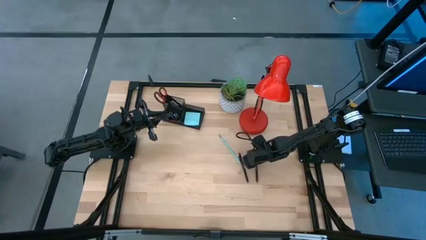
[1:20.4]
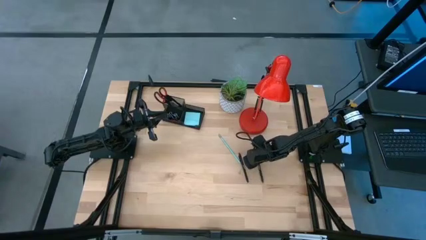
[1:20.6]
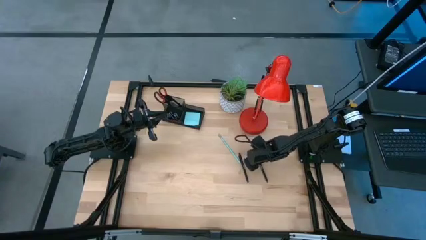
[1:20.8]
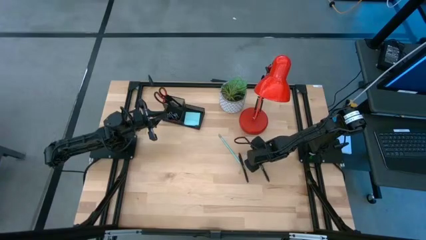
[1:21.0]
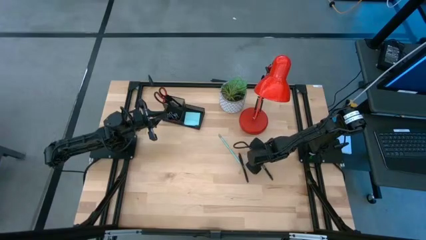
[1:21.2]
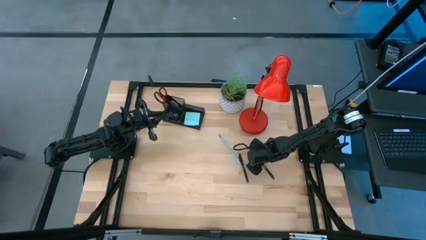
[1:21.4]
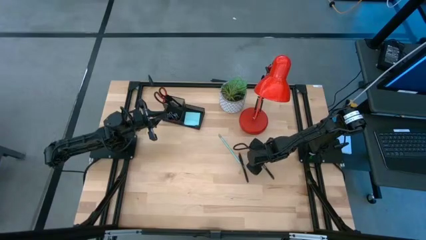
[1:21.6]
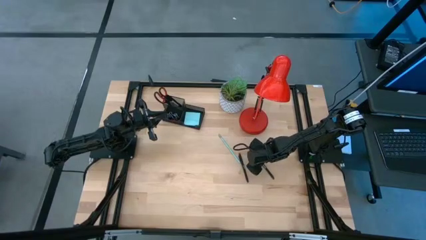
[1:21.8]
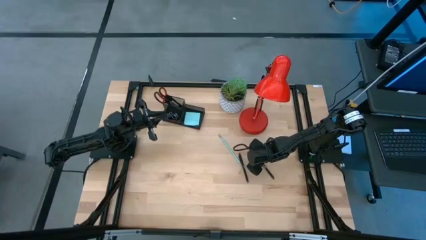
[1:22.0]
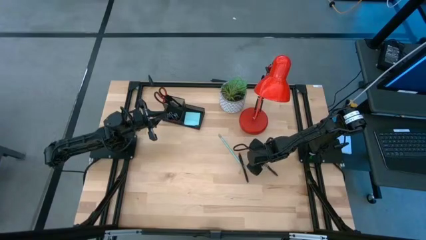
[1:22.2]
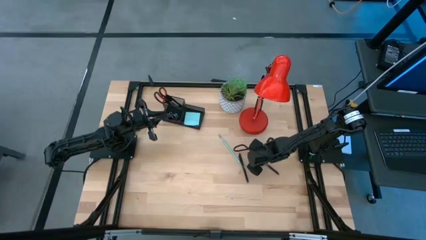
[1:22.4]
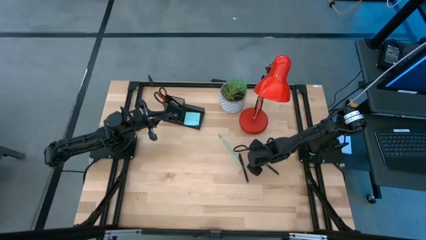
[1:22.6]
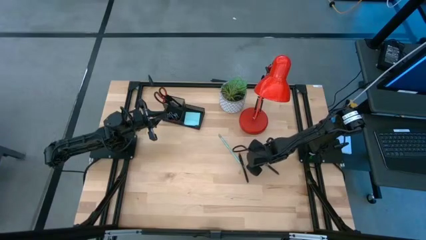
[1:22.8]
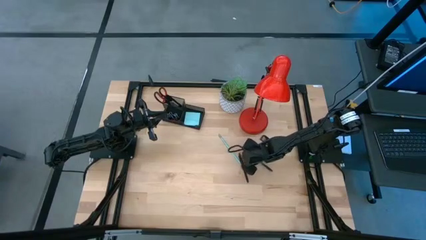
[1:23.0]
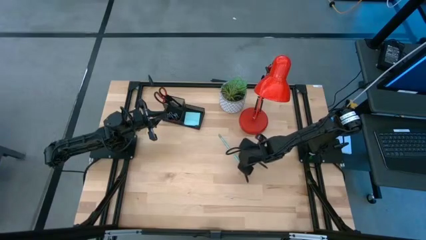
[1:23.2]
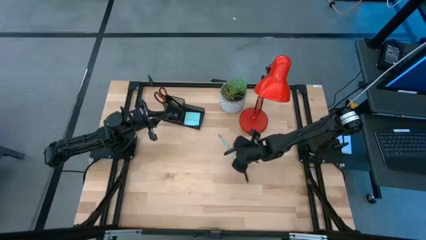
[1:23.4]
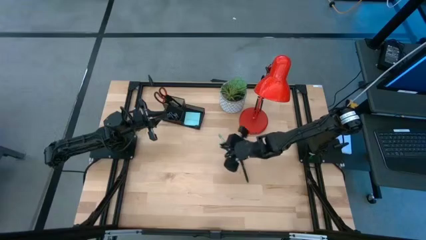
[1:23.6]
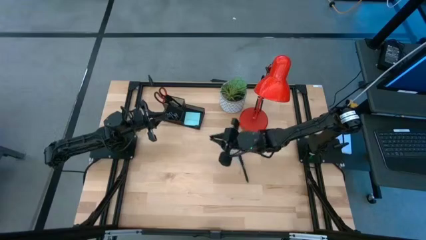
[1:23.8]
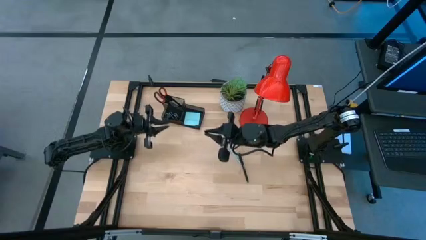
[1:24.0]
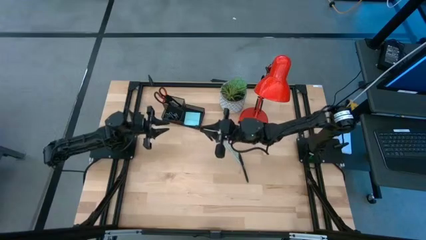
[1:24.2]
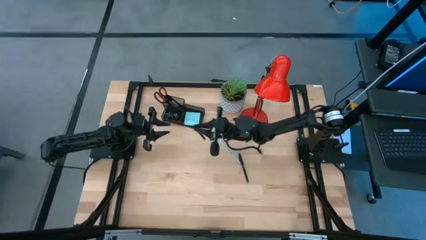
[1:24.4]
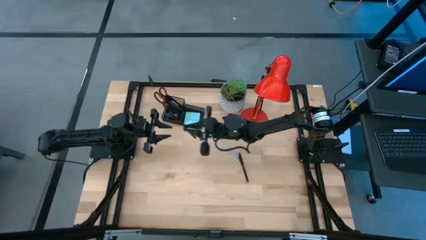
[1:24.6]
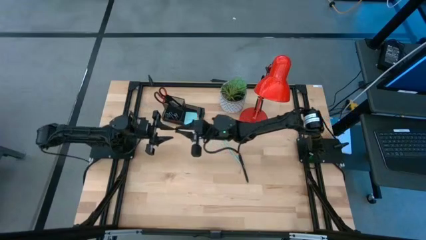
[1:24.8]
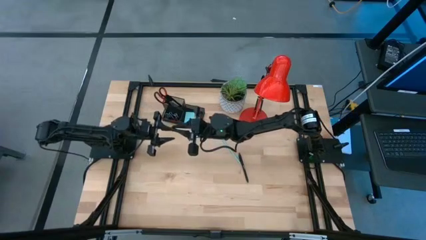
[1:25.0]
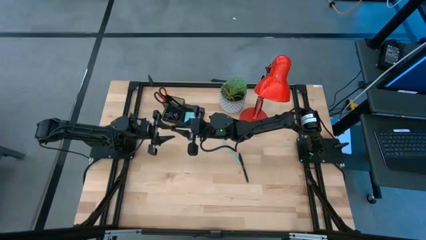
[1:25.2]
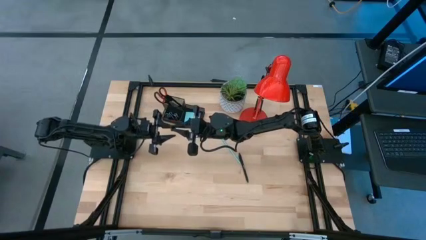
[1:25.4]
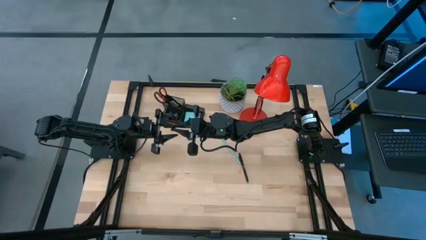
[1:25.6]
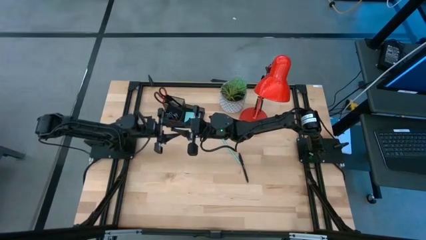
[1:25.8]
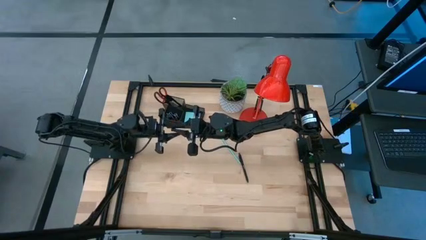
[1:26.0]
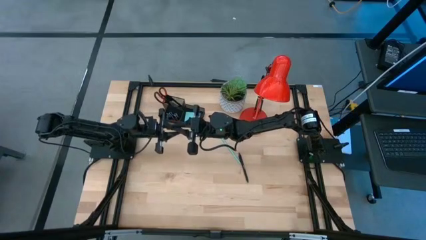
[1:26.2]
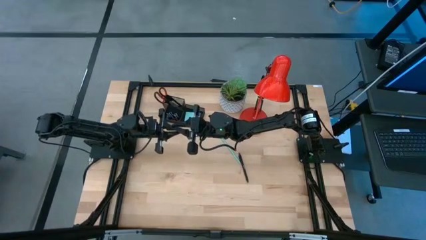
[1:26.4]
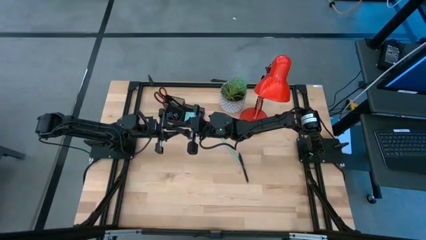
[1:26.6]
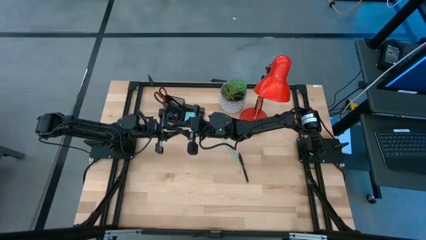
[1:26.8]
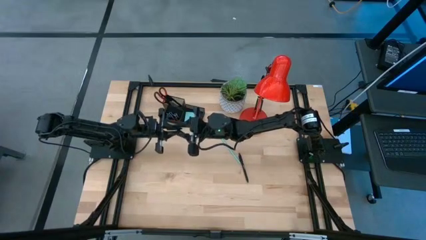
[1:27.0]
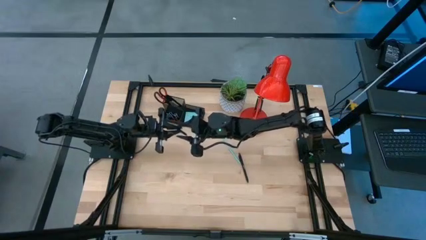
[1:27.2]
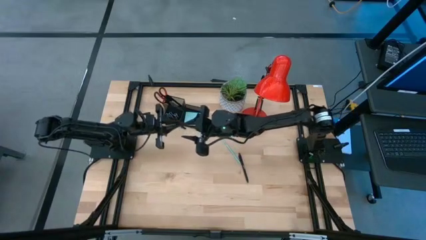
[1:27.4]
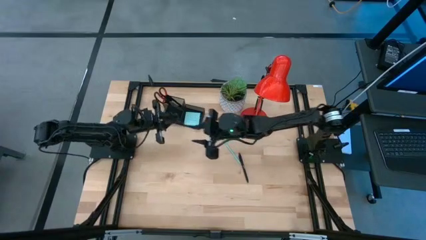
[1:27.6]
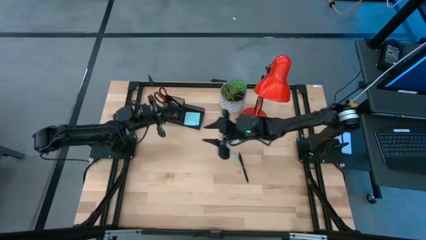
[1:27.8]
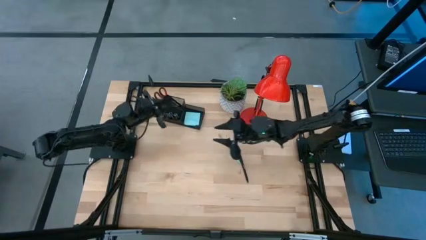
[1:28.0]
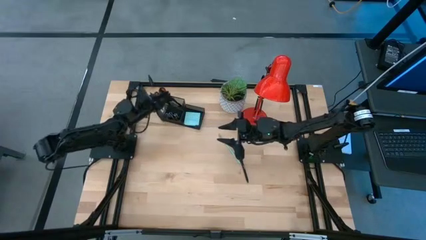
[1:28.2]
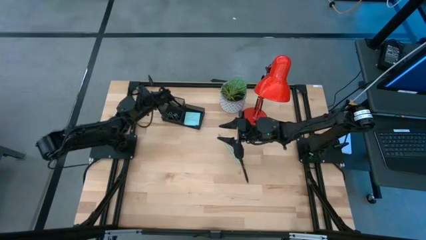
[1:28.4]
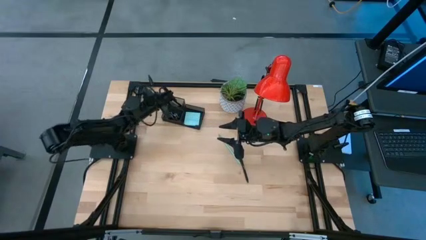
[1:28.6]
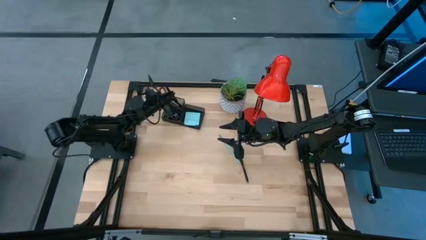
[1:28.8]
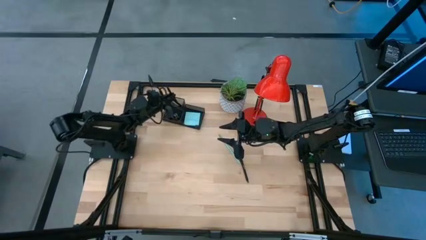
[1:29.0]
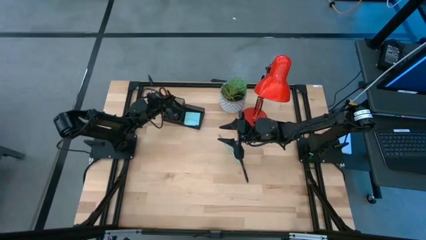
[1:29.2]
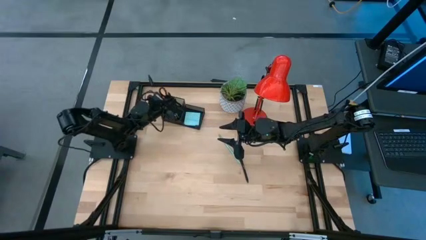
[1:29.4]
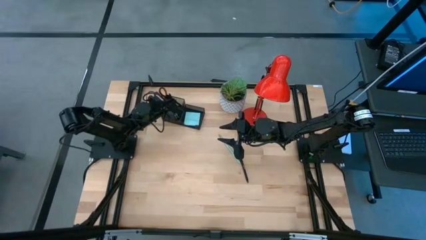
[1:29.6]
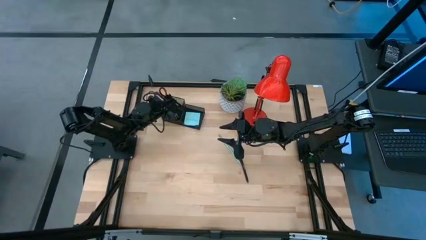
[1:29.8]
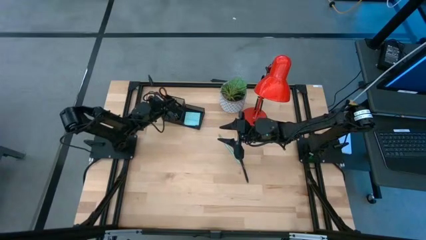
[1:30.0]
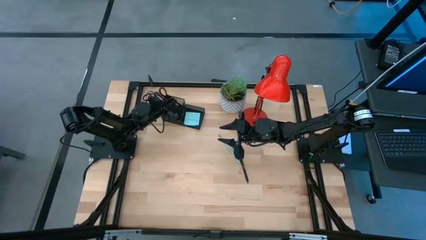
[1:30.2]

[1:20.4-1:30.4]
Task: Pick and place office supplies into organizer
Put the right black pen into the black desk organizer

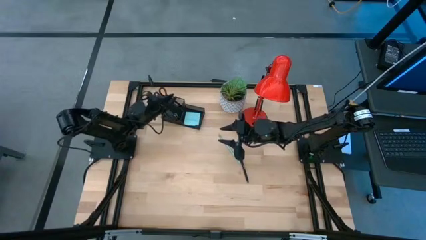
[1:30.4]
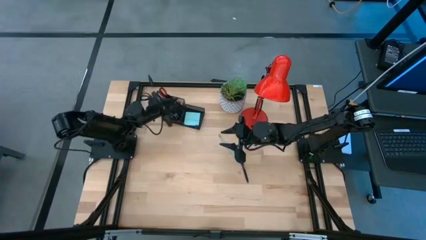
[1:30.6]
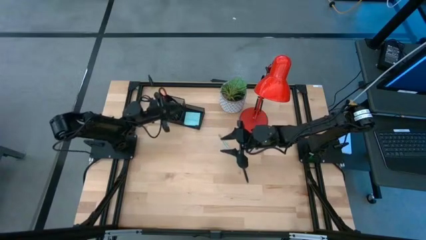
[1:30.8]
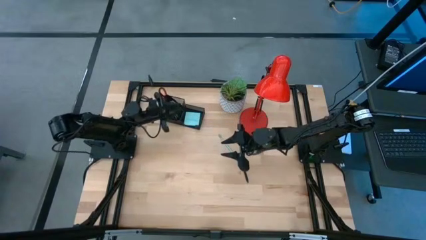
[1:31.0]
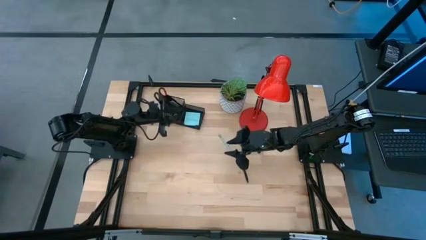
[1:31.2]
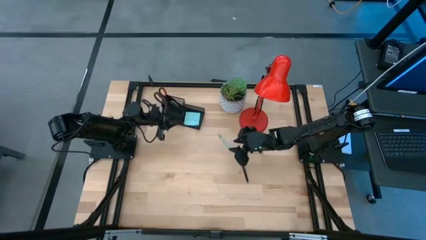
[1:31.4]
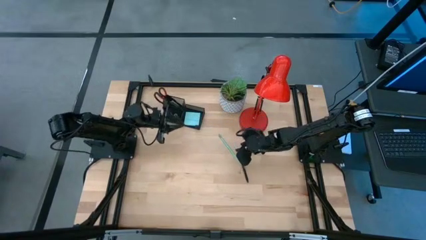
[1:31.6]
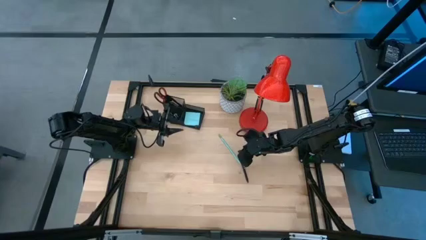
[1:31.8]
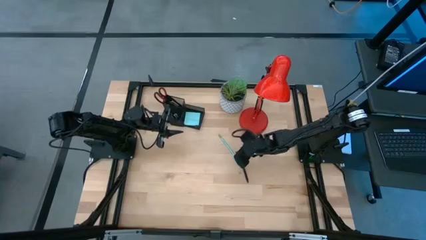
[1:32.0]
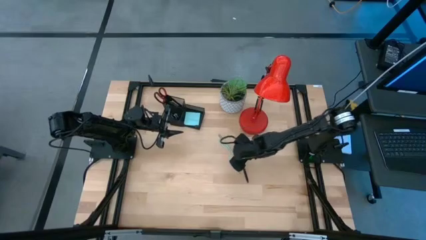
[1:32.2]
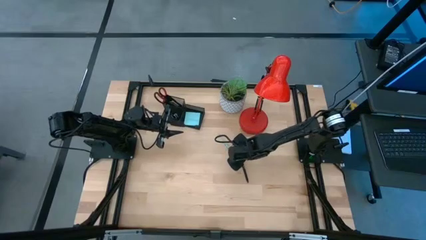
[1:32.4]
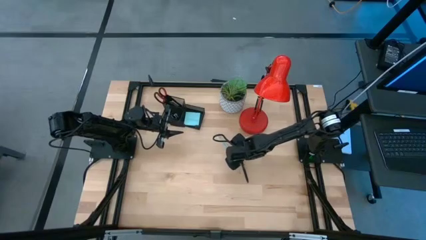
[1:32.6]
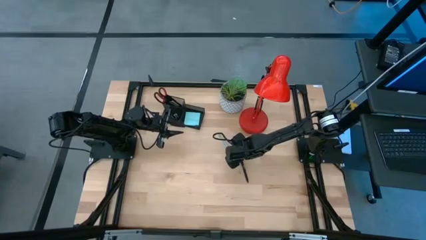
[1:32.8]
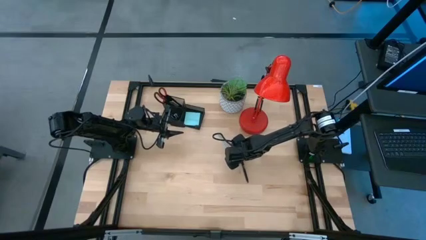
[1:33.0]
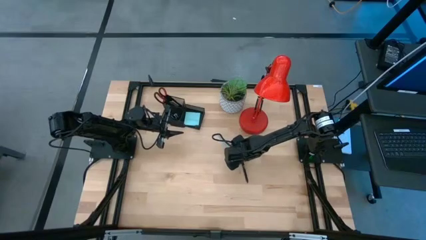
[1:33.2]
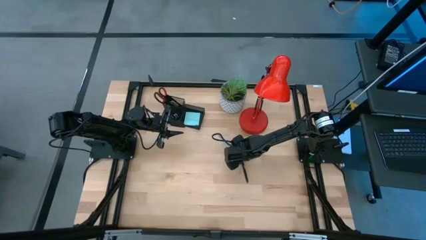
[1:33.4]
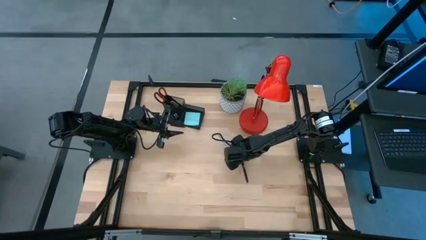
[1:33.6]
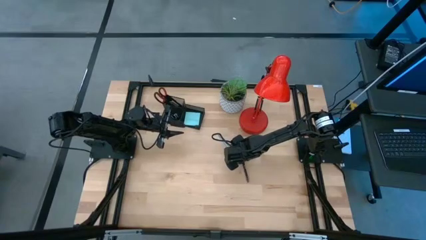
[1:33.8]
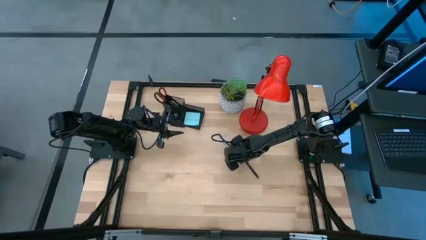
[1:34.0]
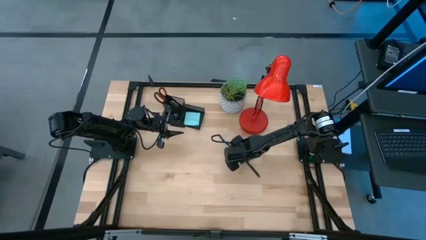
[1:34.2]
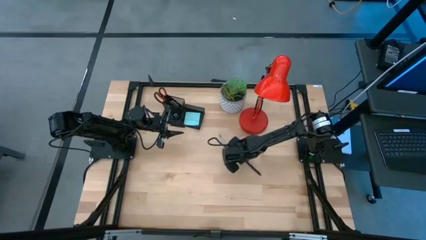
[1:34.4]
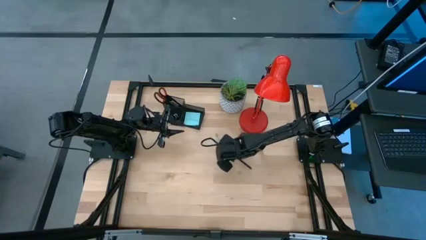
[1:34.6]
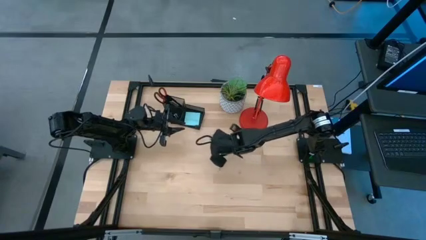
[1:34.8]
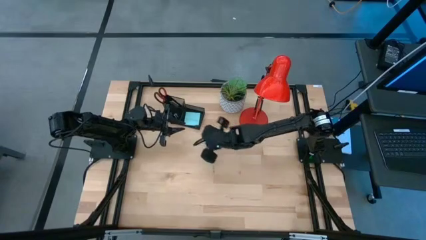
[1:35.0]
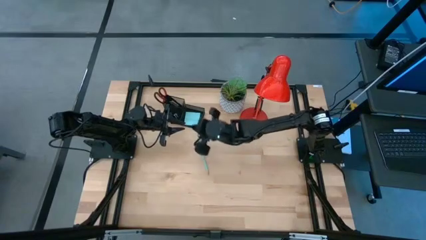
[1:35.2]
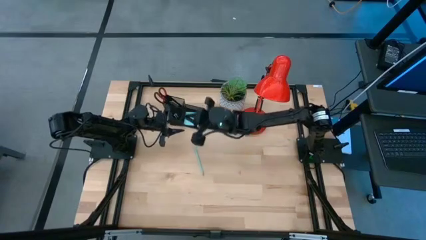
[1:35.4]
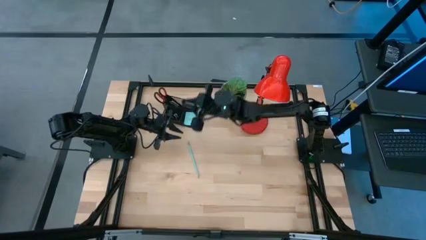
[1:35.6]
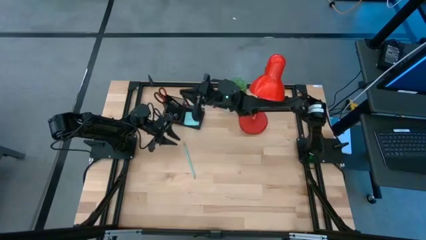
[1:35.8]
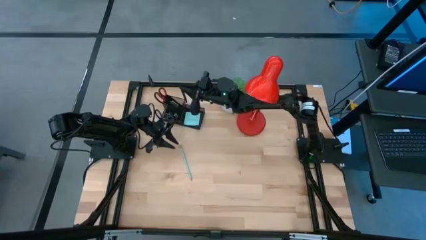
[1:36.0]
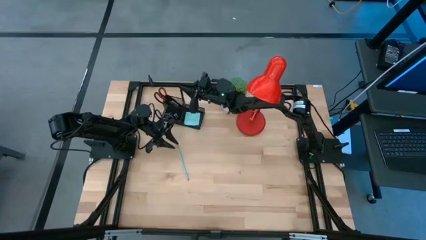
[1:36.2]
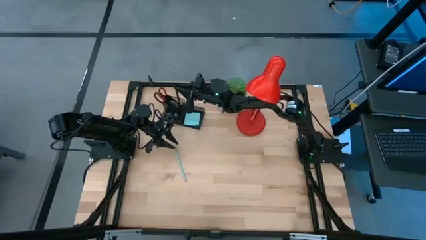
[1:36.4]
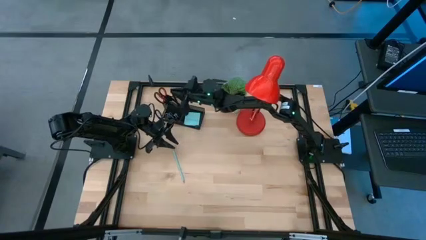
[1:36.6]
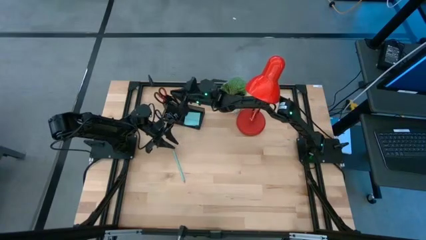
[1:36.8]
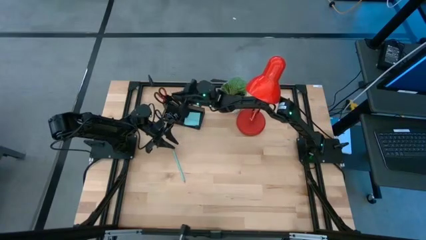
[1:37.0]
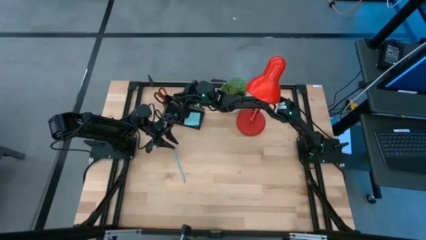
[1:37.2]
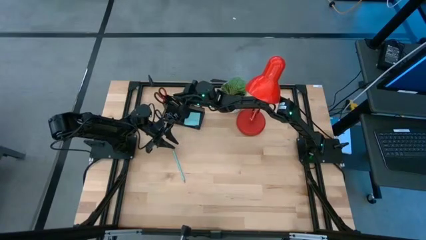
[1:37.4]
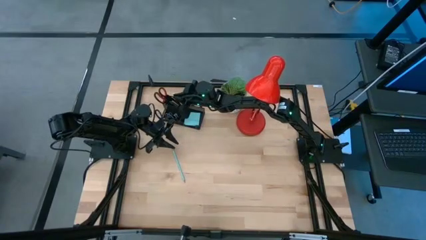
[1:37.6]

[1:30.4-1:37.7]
Put the black pen into the black desk organizer
